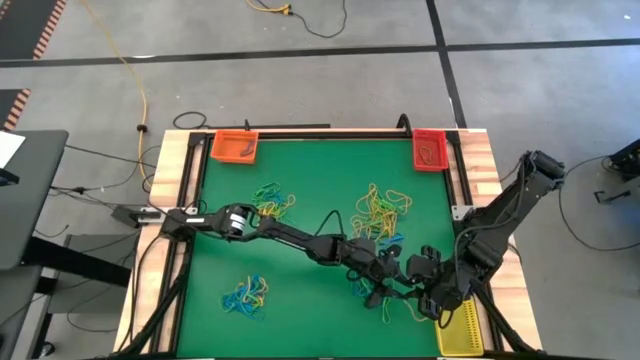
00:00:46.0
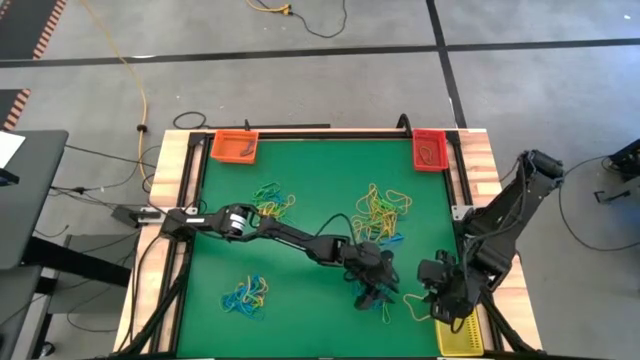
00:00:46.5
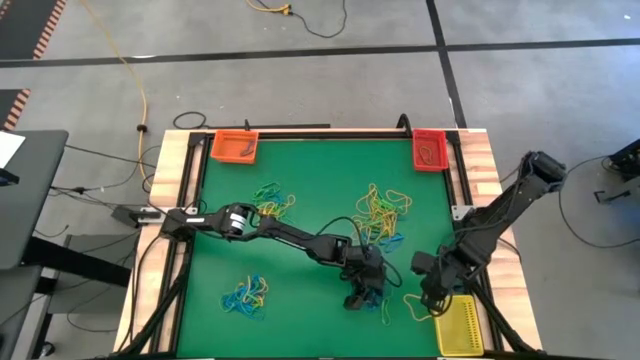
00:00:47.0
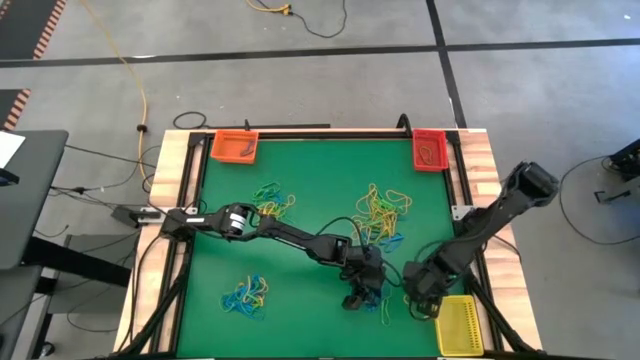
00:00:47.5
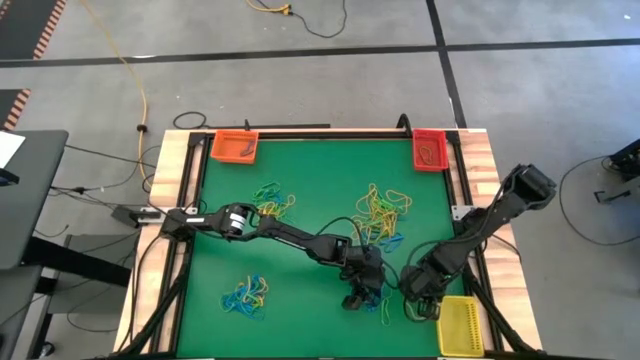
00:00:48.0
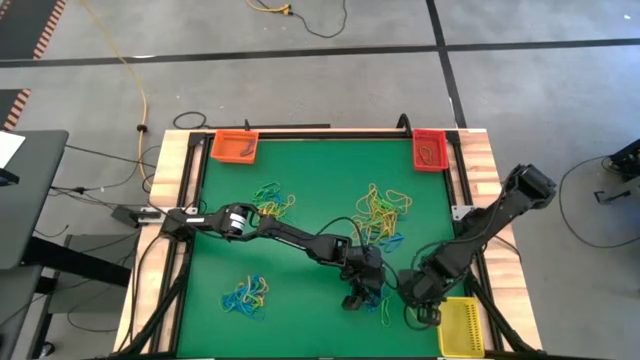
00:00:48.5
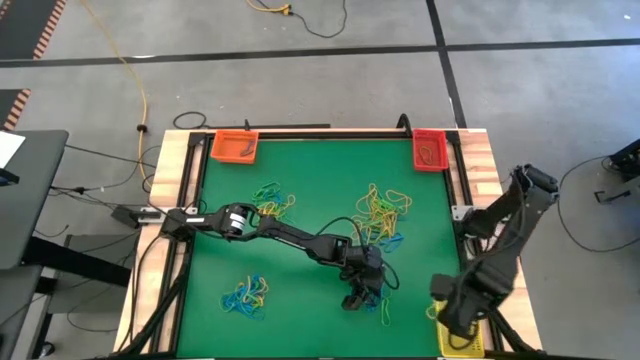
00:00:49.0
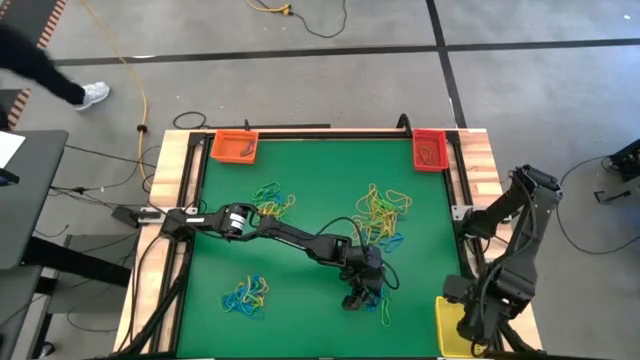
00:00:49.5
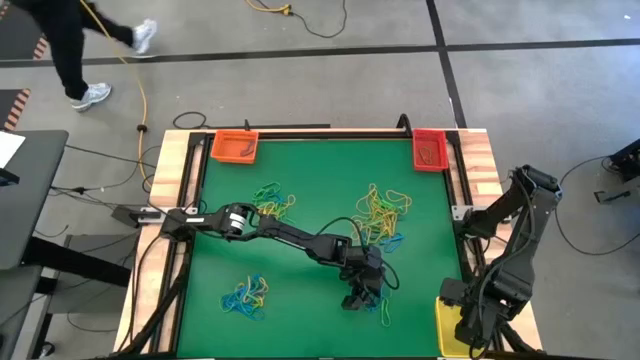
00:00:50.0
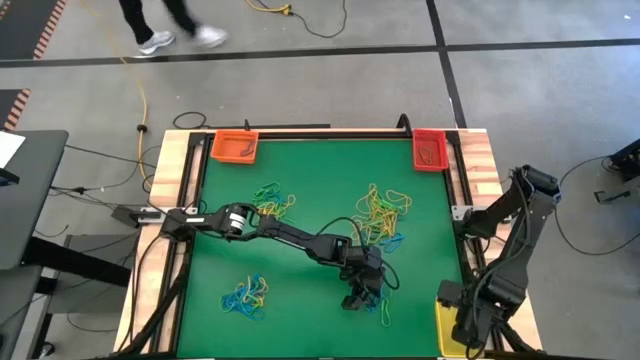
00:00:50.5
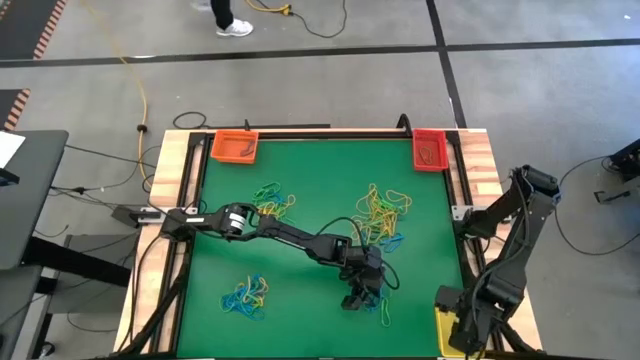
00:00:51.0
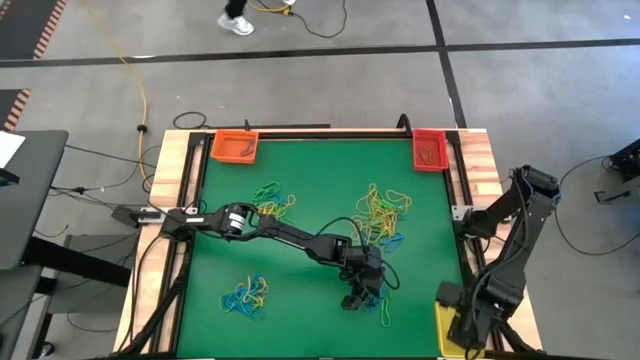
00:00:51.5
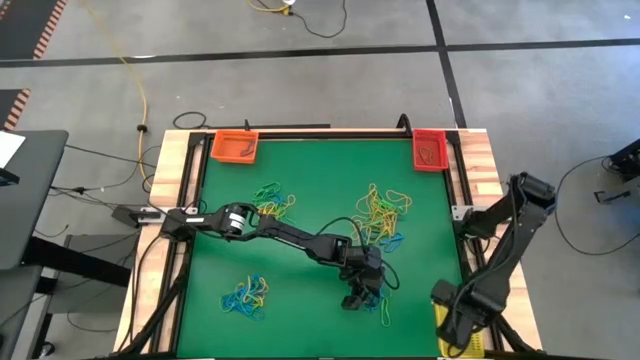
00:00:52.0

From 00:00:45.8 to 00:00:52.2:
Task: Sort rubber bands into baskets
Put the top right yellow rubber band into the yellow bin

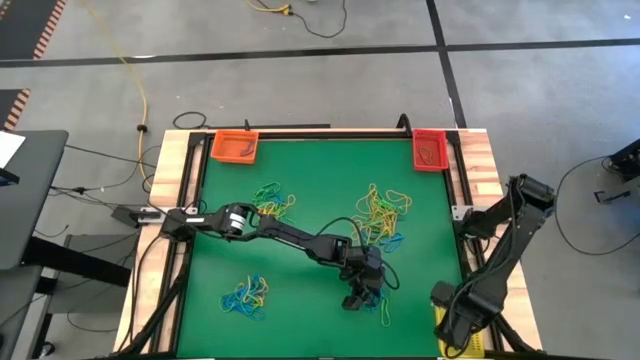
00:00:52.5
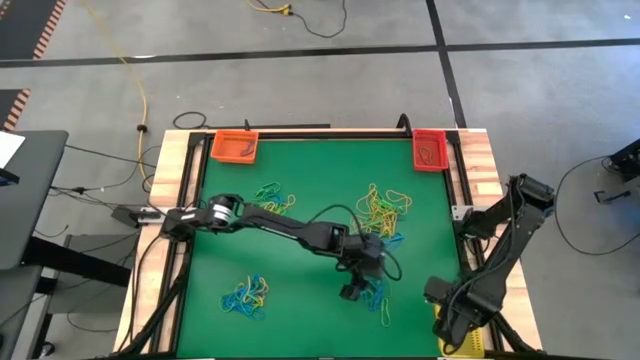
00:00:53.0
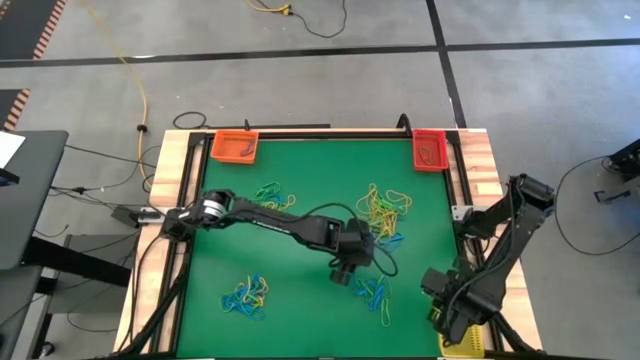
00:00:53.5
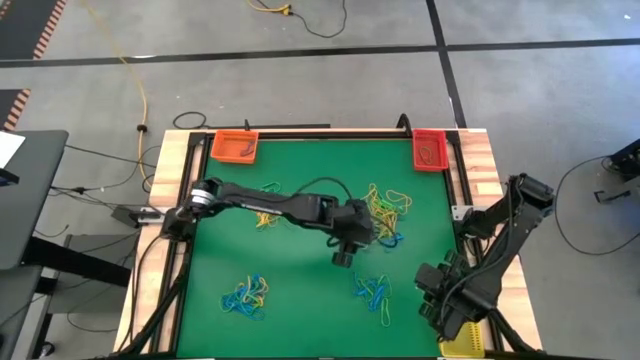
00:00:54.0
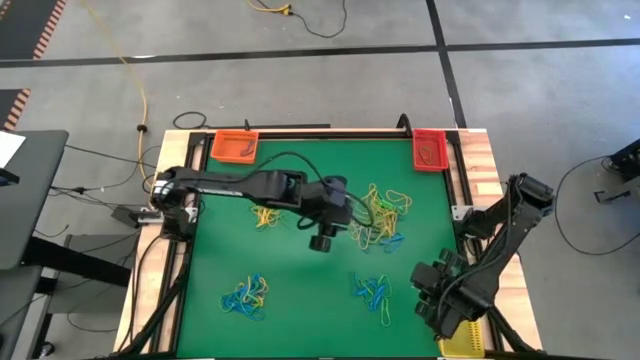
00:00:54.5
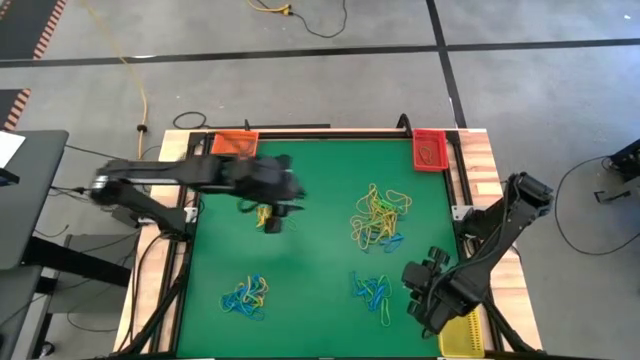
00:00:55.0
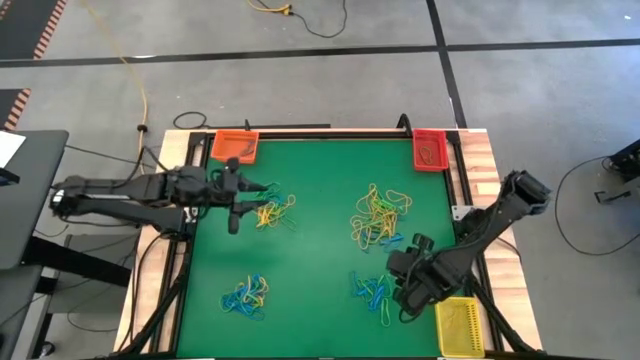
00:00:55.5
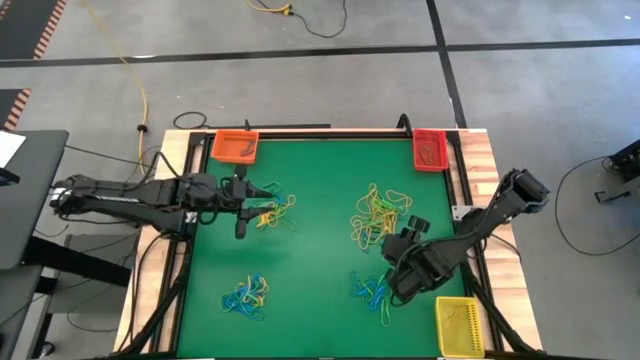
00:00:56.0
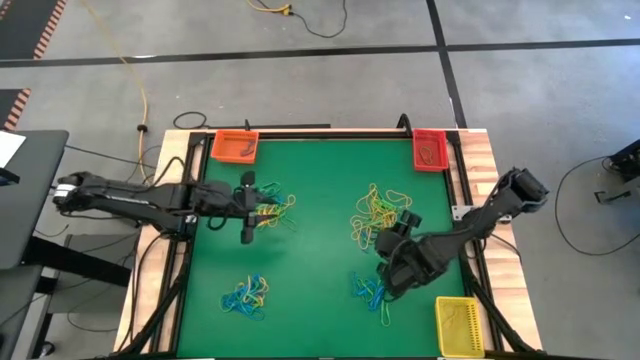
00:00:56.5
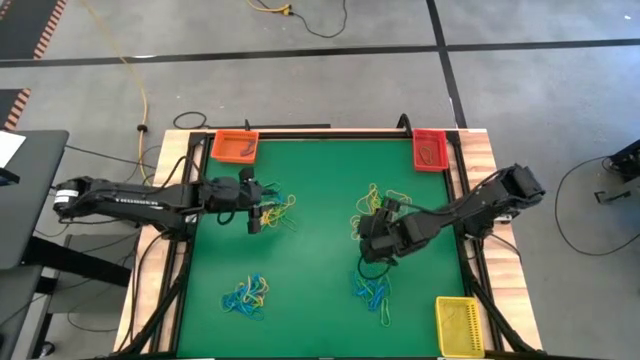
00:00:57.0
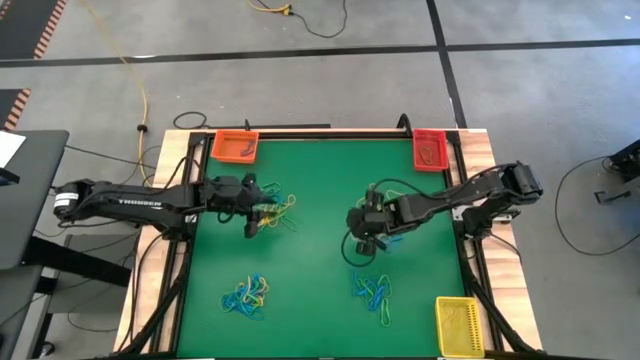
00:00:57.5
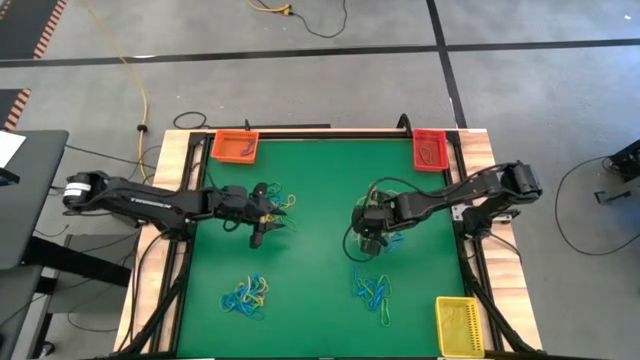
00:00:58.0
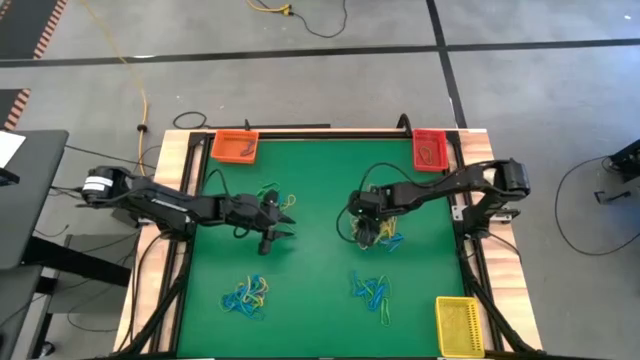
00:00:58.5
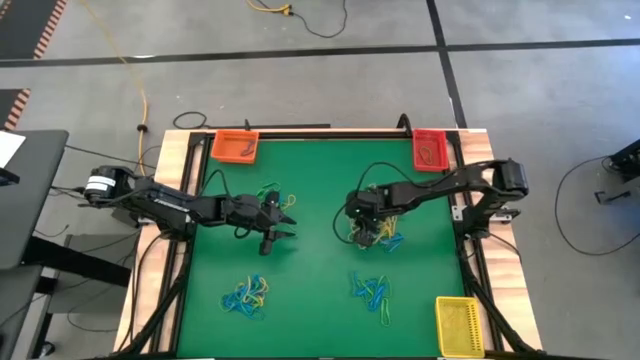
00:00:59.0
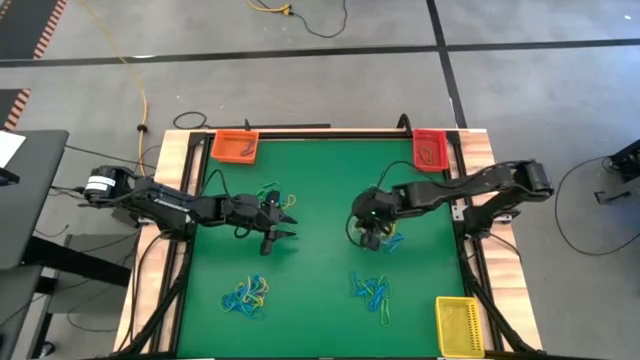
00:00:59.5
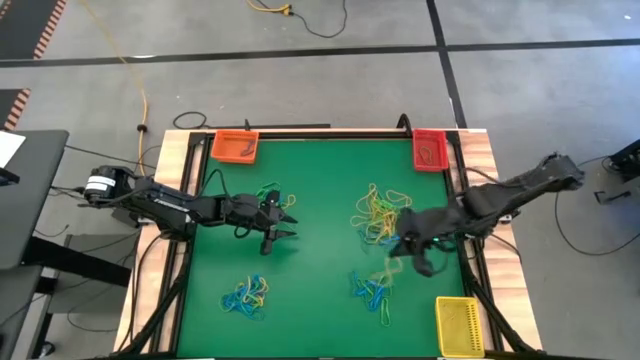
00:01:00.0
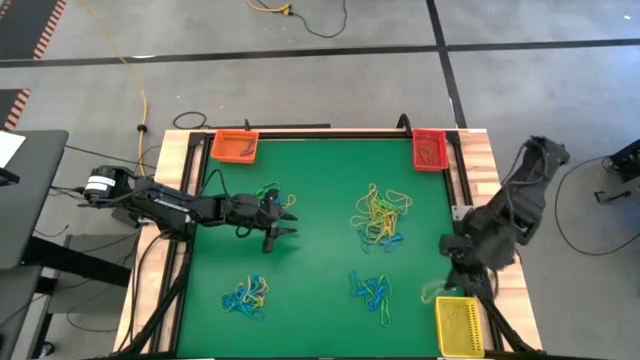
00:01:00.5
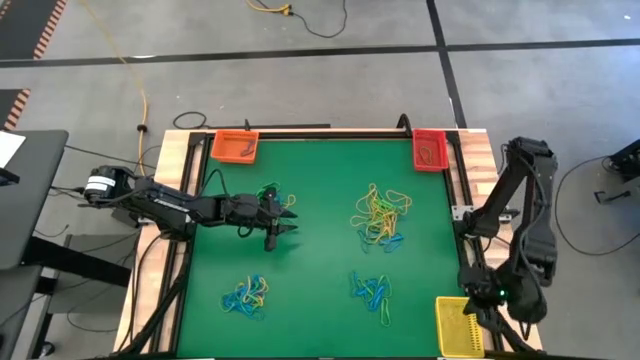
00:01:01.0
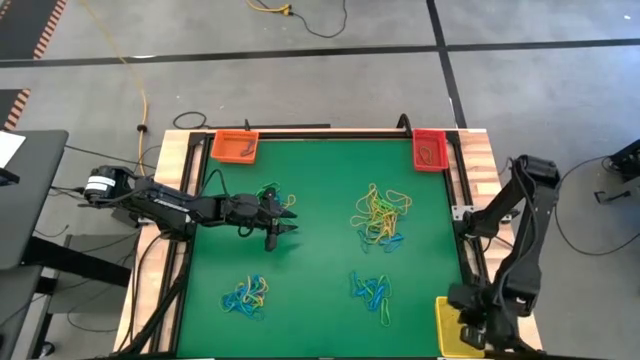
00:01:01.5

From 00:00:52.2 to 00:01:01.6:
Put the top right yellow rubber band into the yellow bin
